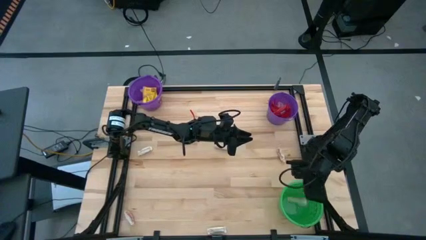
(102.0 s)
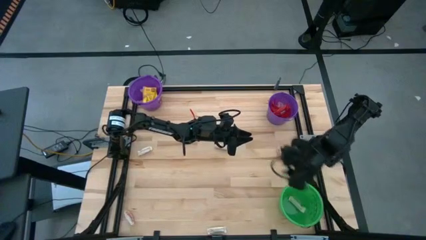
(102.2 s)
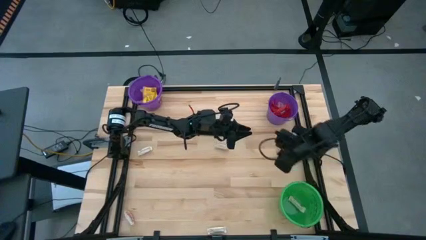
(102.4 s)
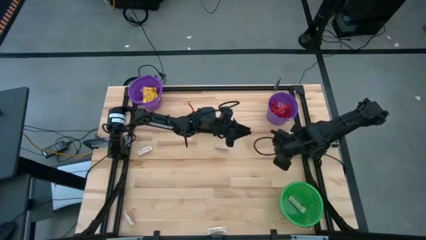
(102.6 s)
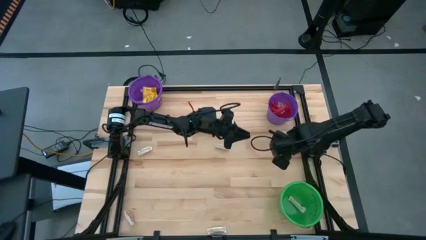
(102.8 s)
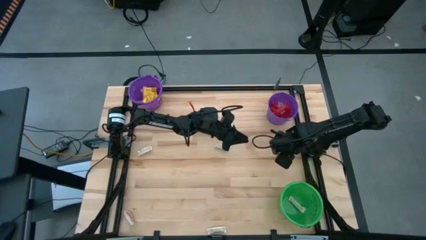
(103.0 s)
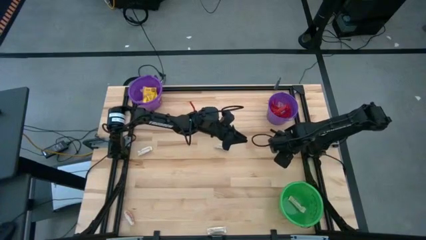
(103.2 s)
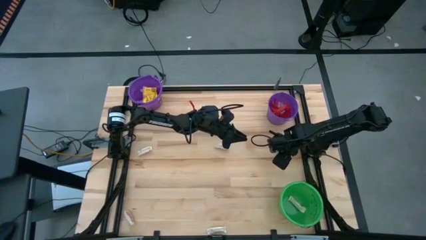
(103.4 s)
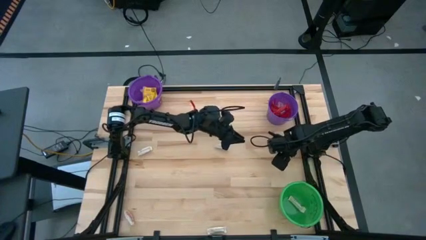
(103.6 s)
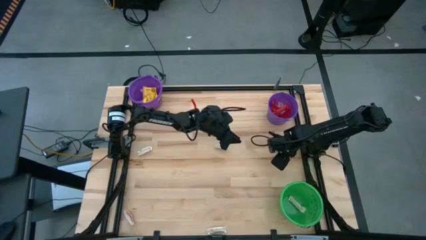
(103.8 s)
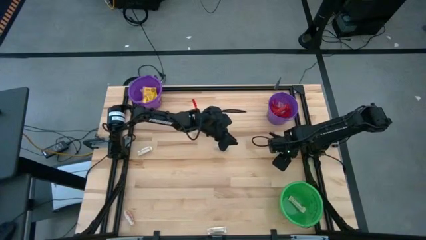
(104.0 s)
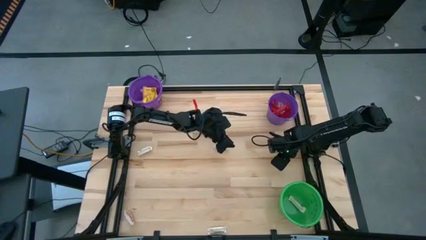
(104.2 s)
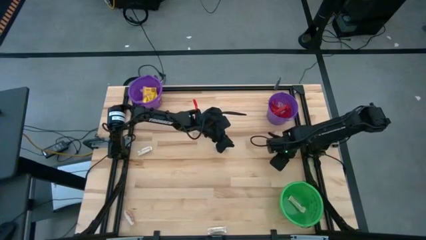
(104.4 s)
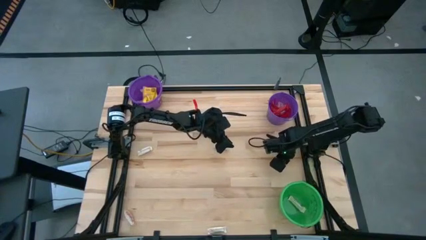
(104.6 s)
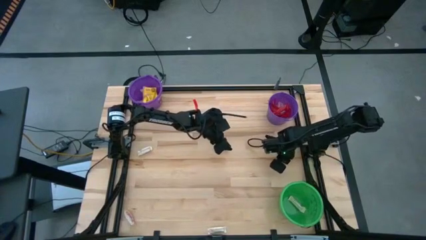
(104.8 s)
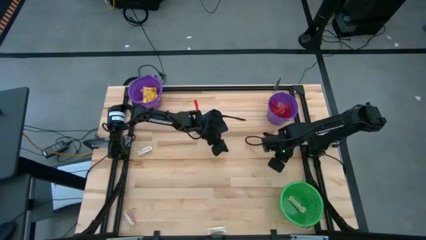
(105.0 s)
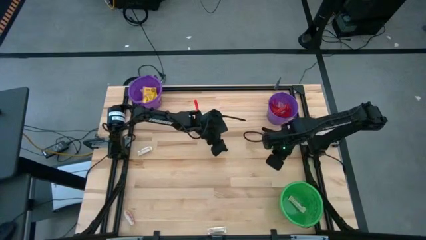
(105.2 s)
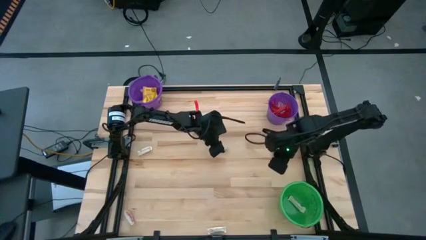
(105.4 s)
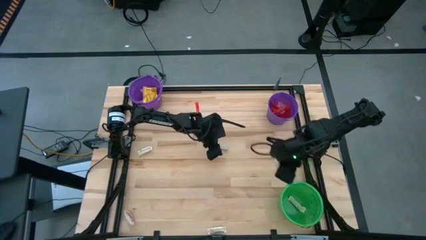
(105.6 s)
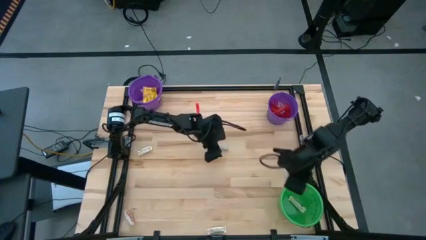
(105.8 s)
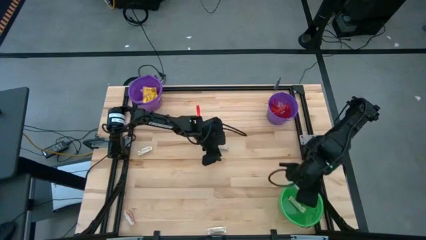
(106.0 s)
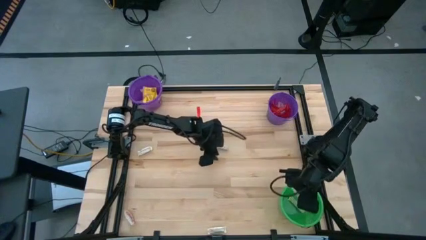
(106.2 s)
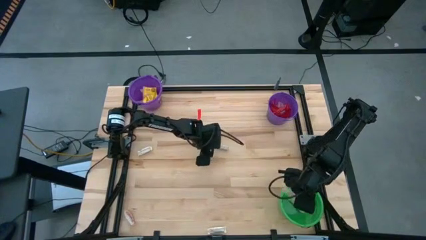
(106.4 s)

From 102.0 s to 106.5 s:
Task: Sort candy by brand, put in halloween buckets
Put the white chocolate bar into the green bucket

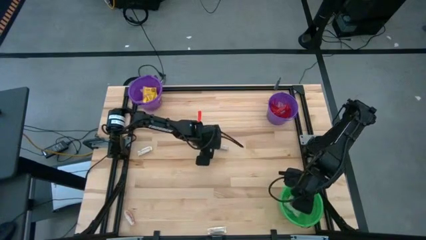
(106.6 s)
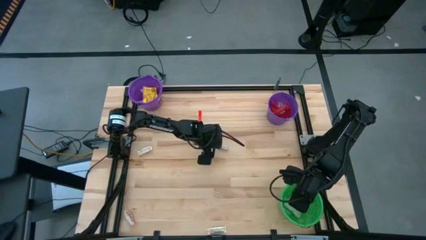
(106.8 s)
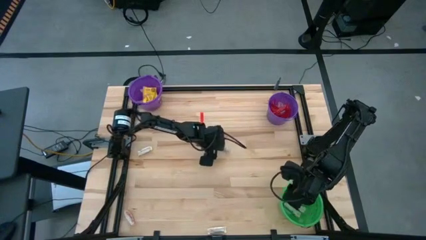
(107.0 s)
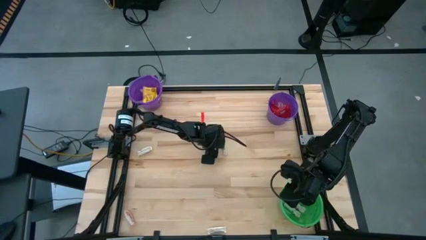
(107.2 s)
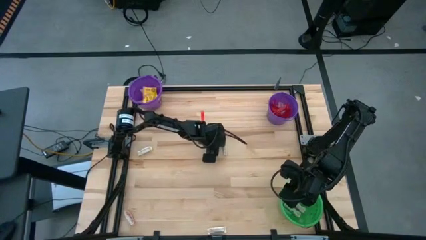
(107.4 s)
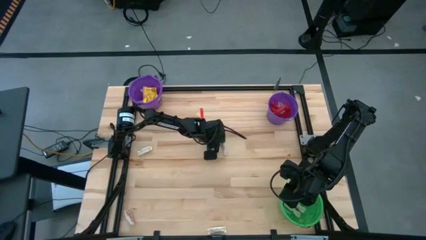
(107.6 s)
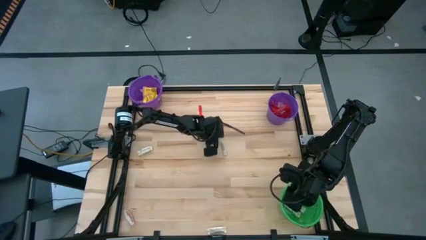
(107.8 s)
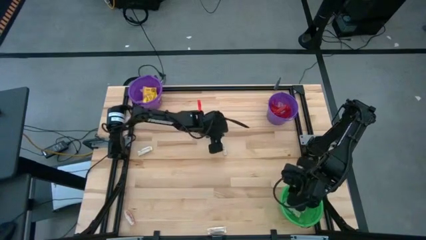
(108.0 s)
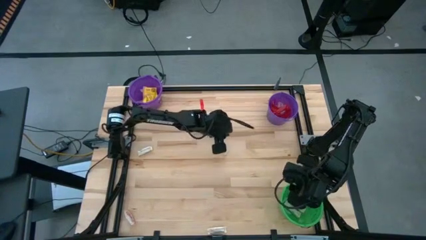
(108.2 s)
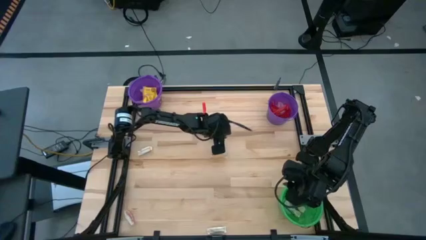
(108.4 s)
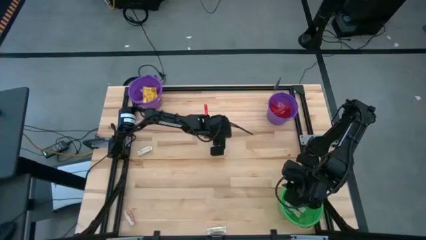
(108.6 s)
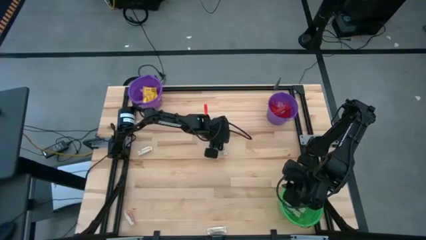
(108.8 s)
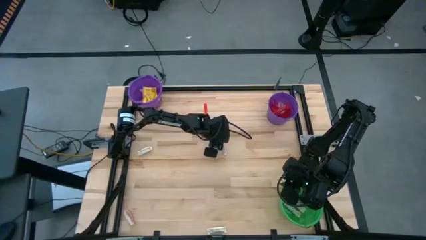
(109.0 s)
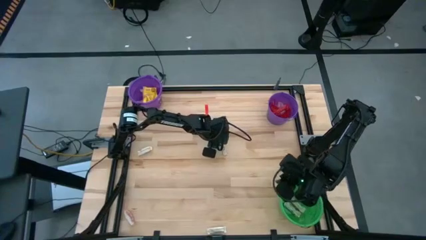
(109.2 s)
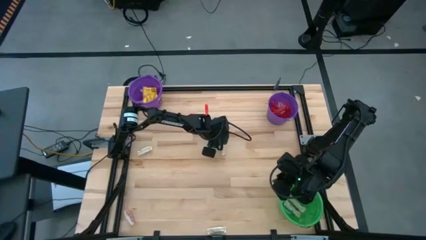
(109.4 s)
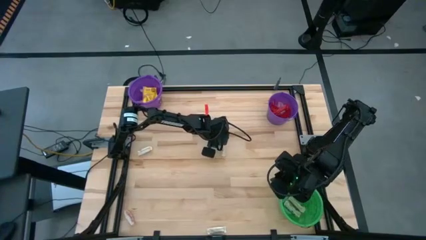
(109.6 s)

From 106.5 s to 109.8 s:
Put the white chocolate bar into the green bucket

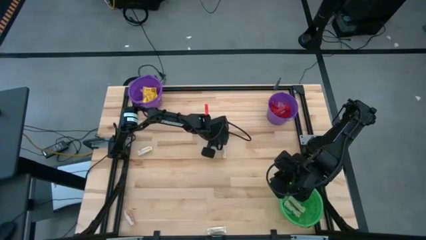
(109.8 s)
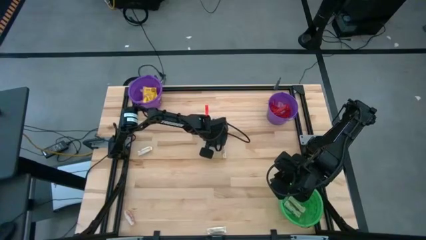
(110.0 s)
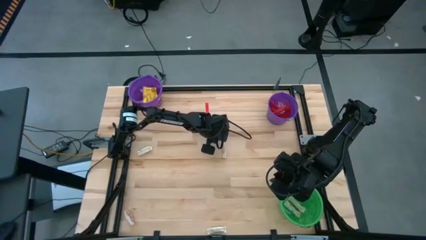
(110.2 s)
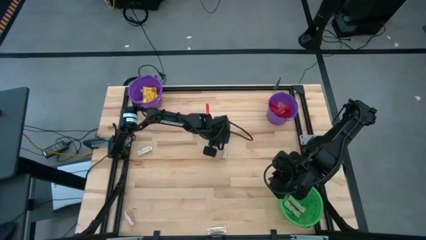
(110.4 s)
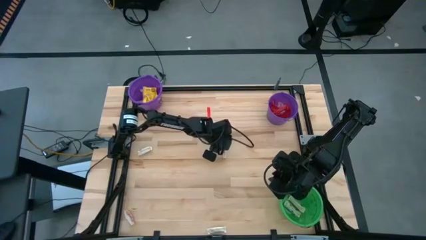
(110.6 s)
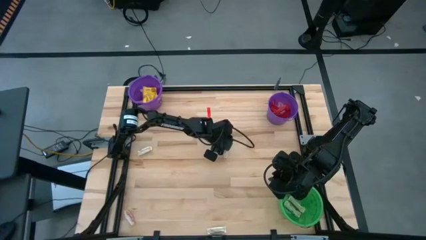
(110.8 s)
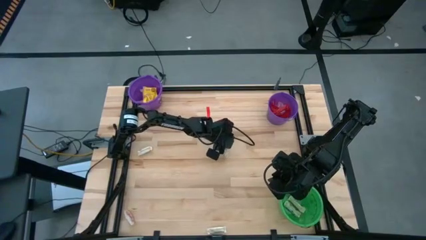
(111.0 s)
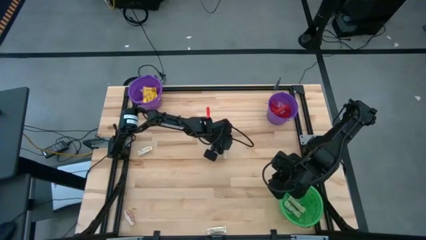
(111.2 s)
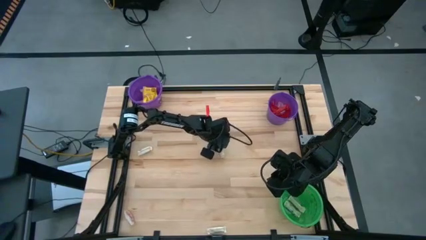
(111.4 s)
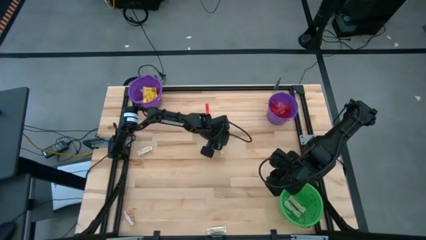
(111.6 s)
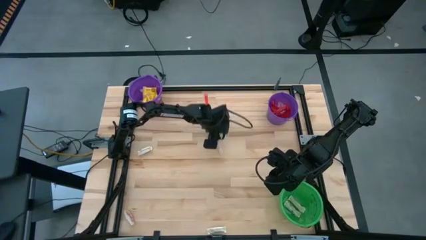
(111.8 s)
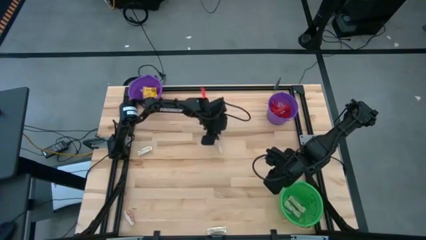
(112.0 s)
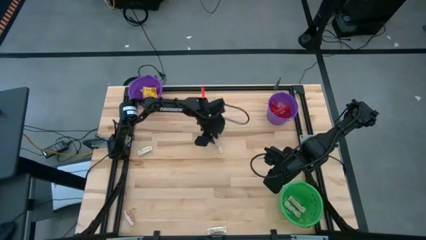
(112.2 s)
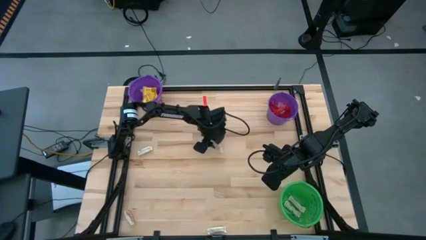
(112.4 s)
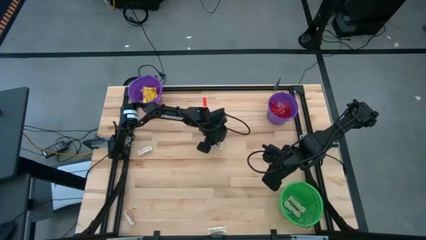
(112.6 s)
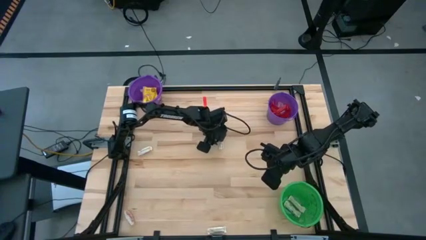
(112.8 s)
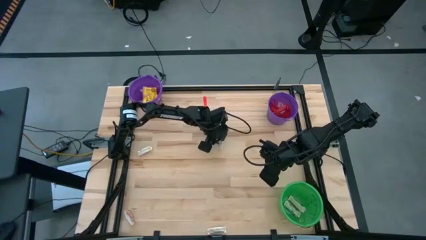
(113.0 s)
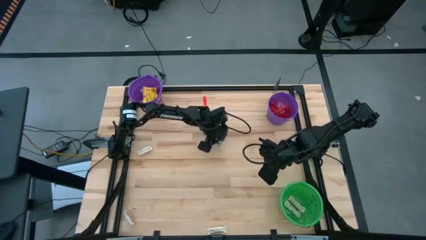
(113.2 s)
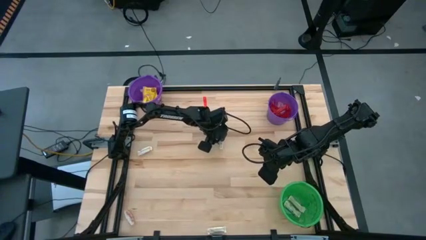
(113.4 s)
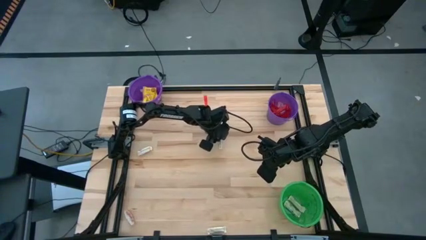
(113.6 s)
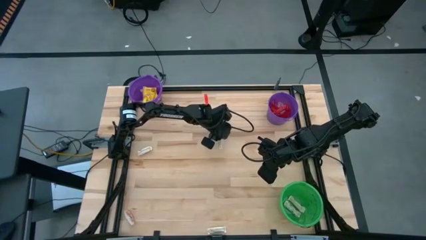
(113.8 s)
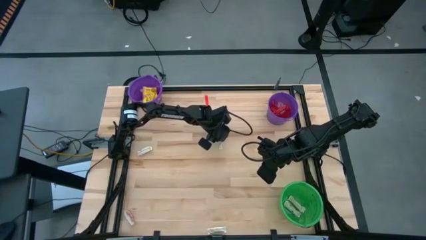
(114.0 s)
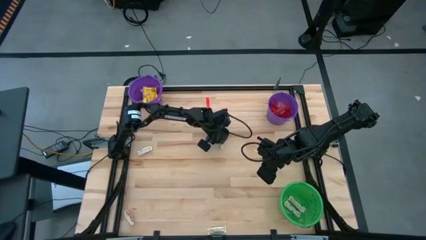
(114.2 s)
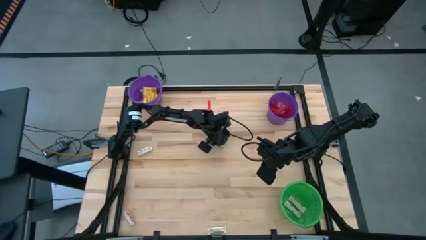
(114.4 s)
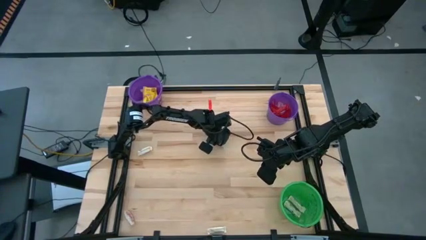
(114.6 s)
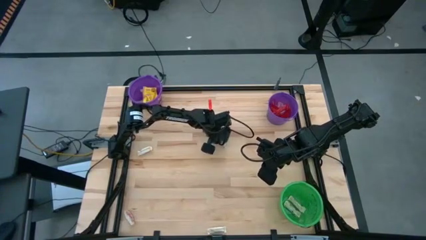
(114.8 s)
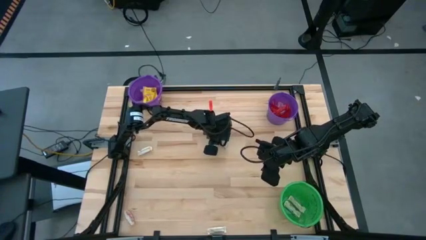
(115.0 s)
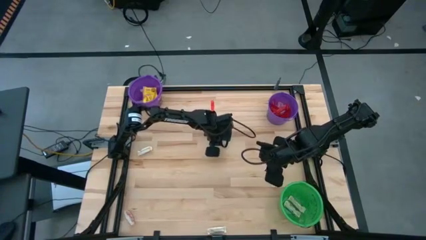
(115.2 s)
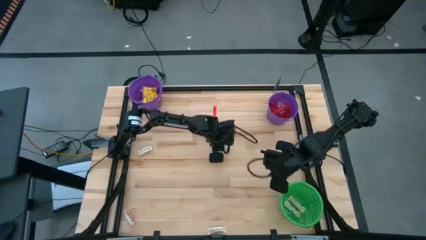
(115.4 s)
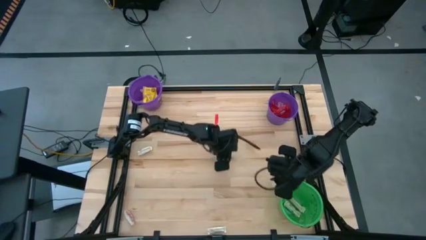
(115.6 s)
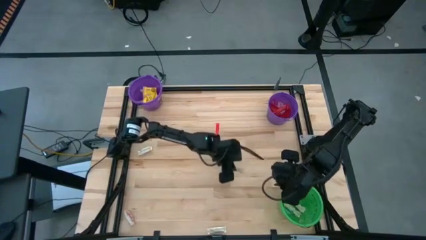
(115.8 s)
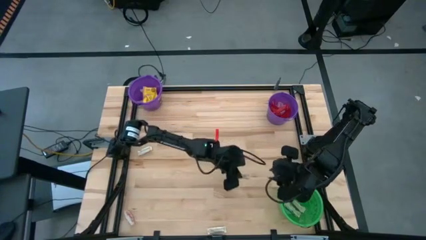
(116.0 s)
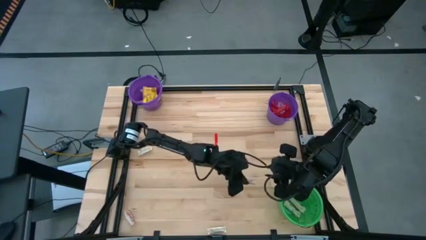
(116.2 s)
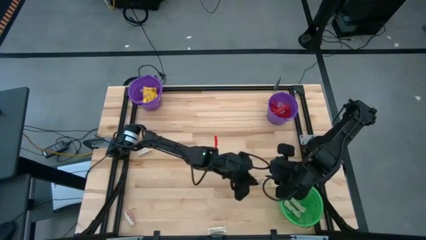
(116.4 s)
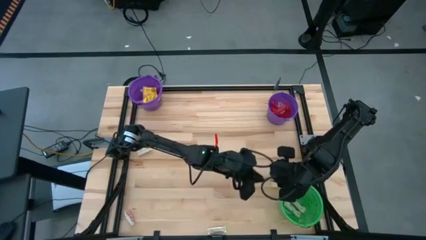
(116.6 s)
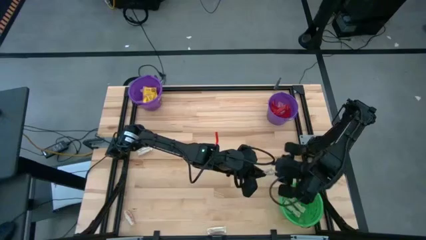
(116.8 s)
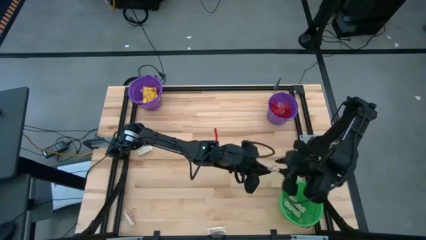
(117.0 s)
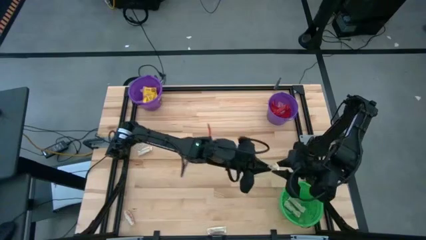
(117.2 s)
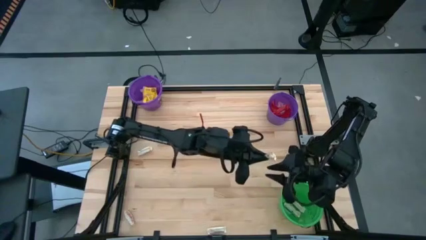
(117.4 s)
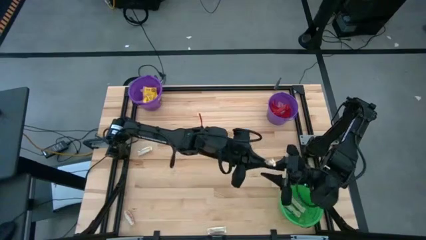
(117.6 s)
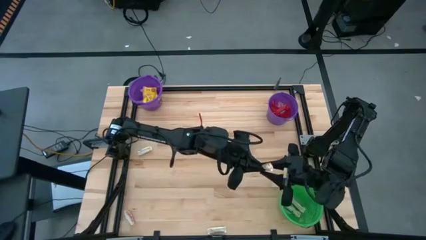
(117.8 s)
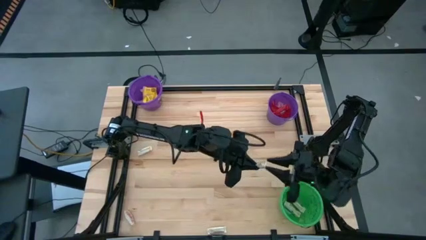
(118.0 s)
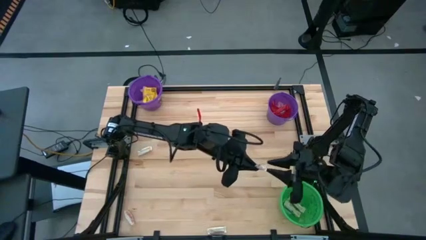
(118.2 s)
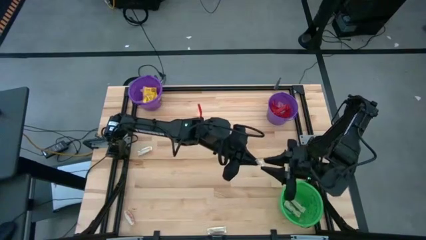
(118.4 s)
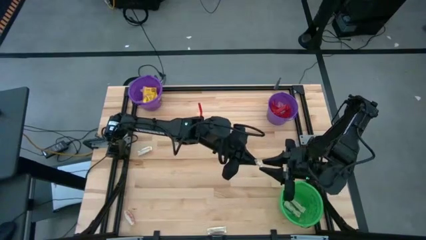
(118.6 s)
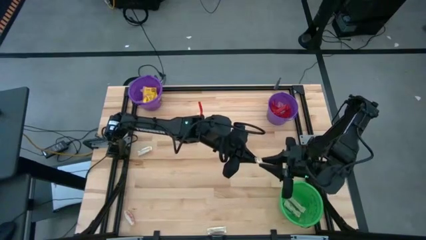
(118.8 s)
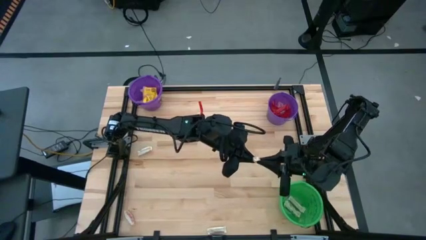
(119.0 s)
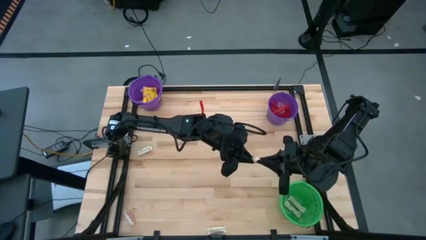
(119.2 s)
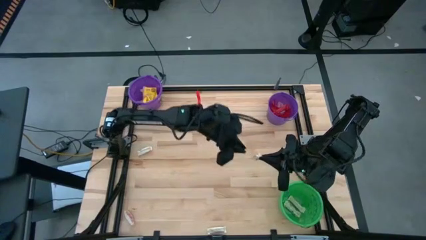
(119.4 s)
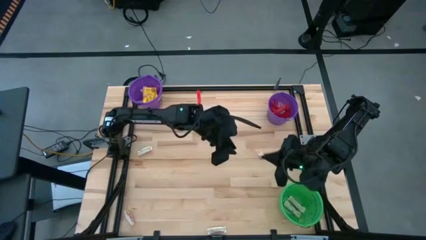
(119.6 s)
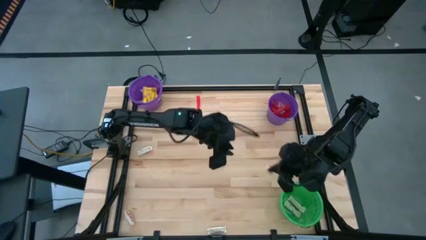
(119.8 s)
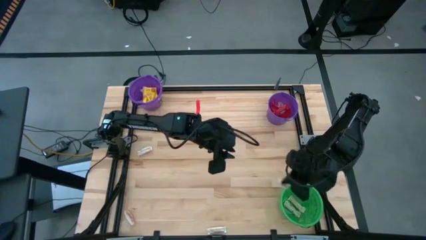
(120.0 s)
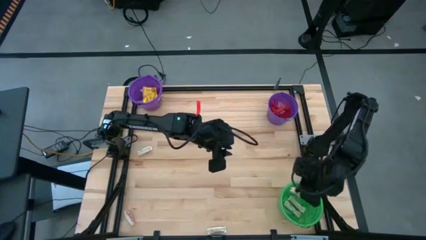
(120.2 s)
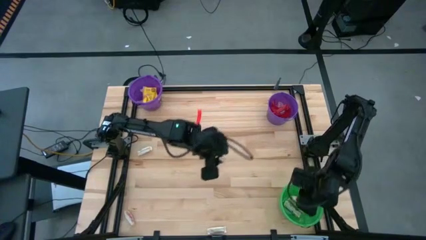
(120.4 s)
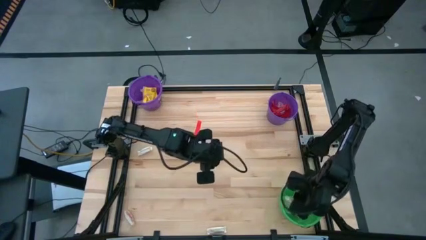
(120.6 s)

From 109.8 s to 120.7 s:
Put the white chocolate bar into the green bucket
